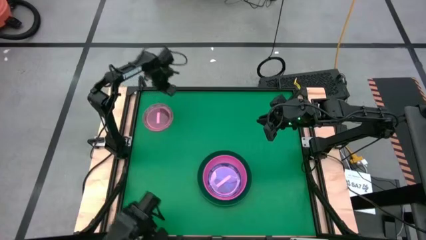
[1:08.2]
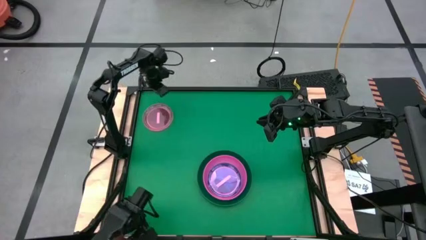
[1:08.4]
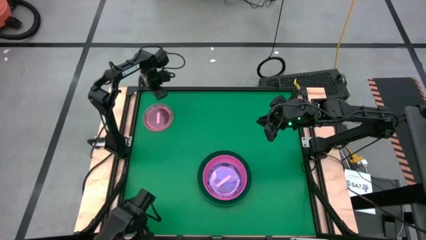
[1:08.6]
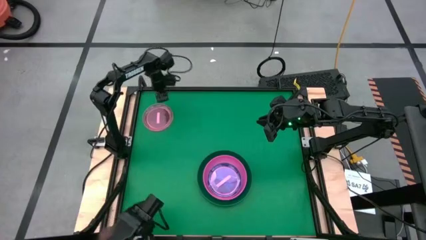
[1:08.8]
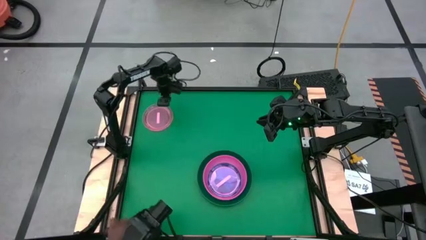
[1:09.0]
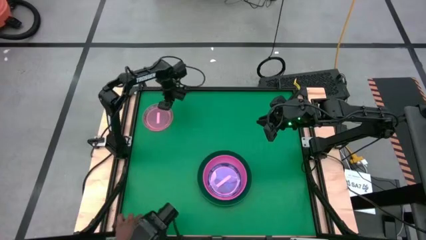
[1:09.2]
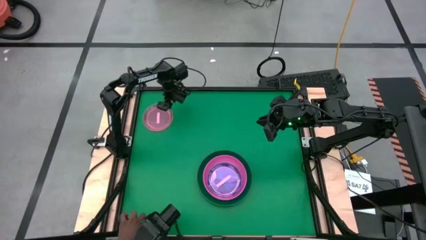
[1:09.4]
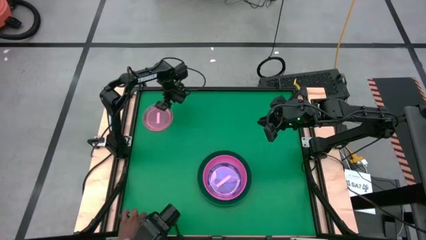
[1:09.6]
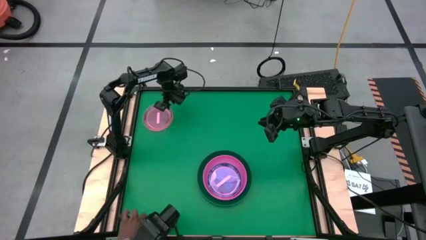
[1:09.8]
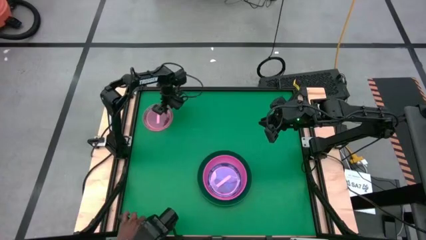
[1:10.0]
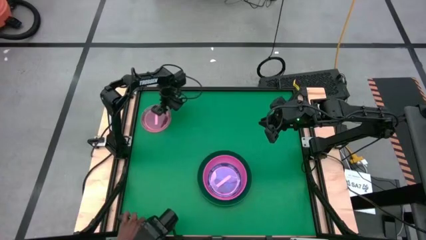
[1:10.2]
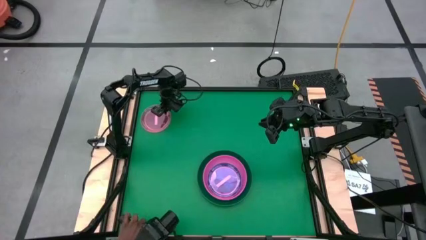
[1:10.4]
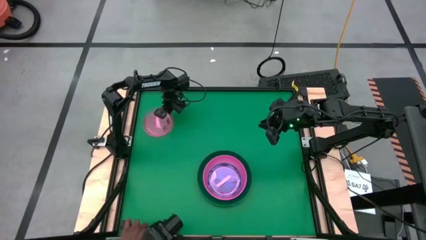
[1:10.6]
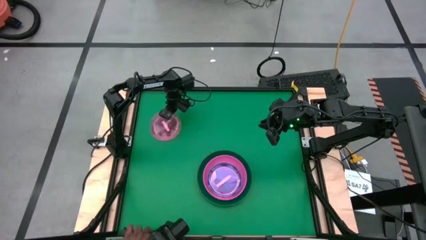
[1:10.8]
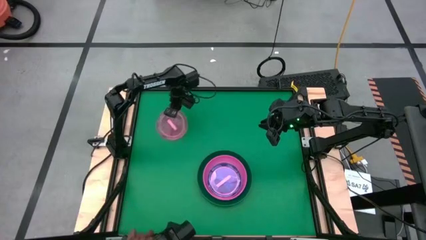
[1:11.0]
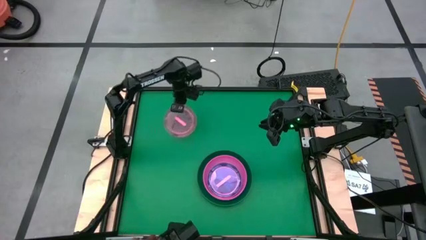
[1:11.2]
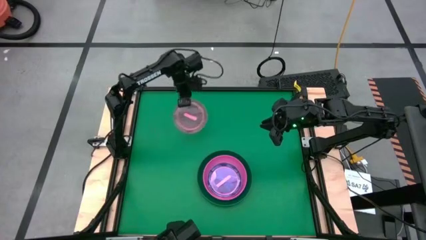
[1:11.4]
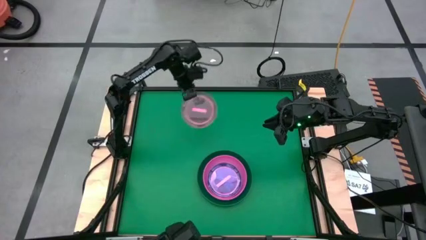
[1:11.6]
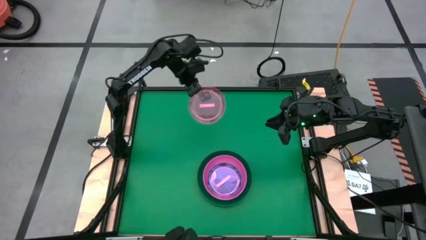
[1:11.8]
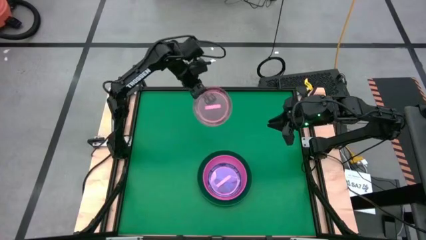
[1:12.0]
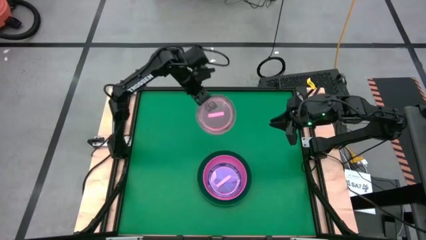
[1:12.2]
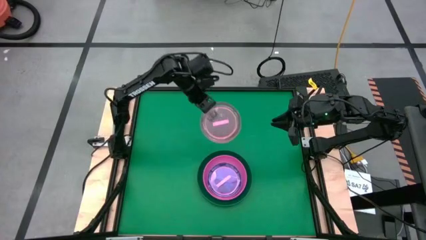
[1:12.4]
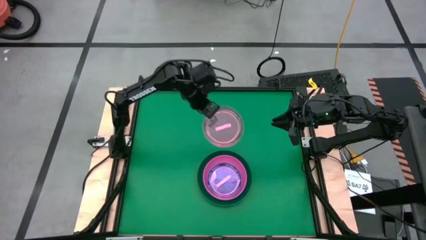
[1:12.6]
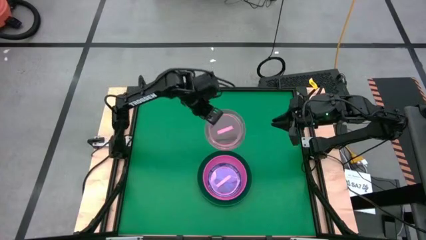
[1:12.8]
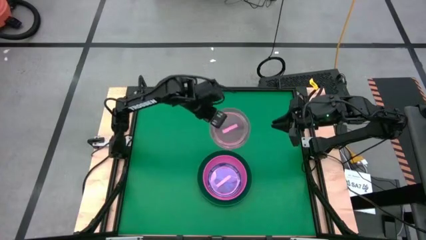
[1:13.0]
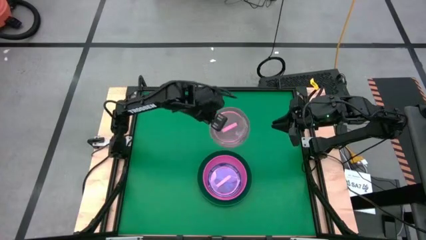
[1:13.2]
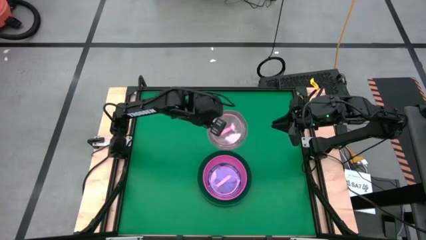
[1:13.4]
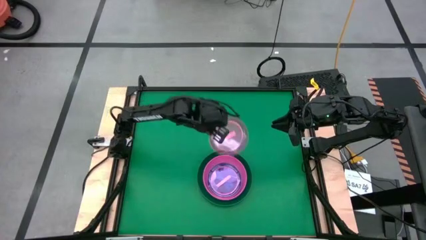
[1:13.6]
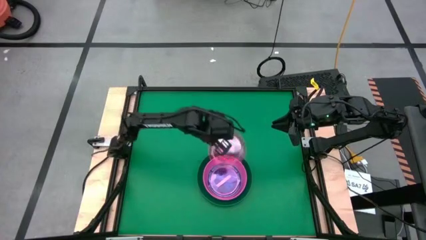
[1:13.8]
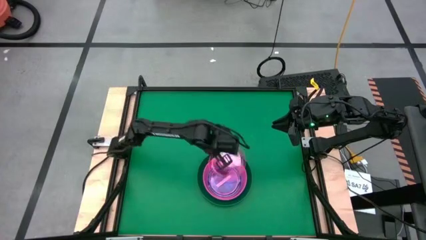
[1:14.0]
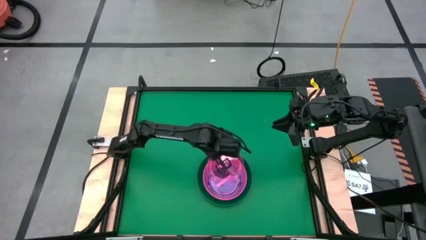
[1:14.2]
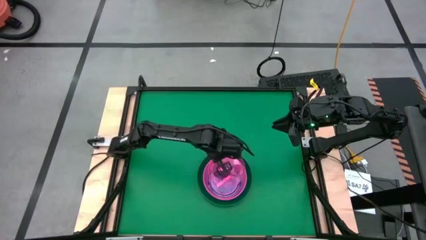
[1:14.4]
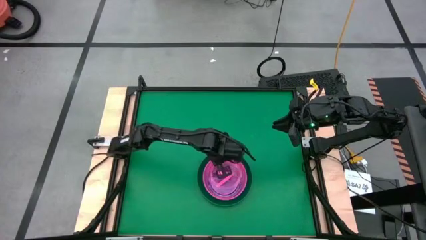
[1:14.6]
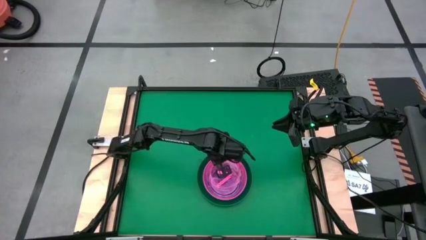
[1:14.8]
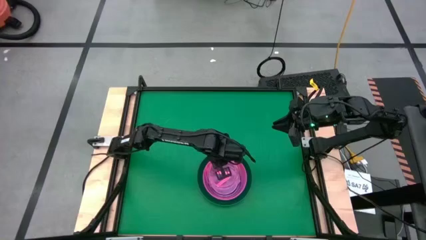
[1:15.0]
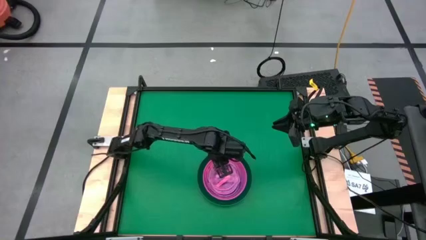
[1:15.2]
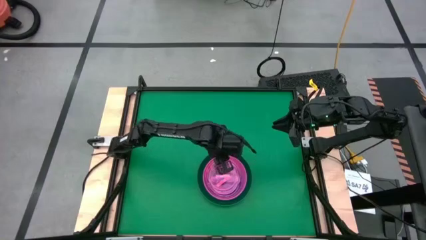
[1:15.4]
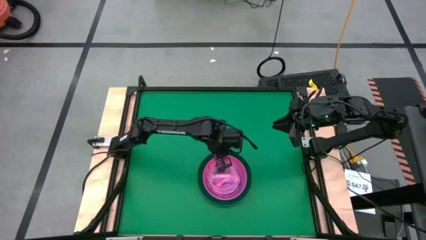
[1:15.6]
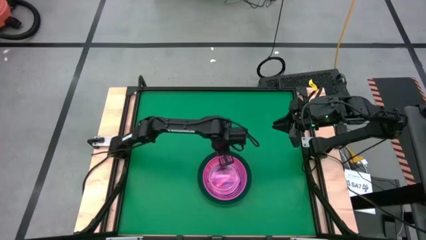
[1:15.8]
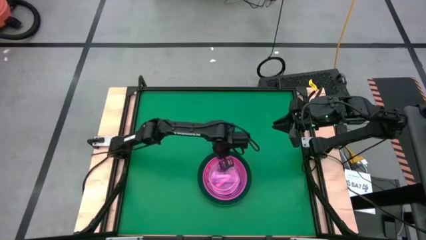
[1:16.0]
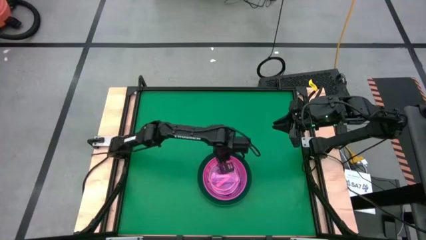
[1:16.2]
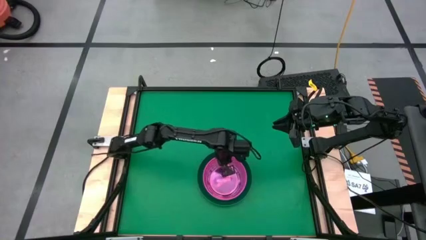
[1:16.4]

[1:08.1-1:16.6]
Task: Stack plastic plates
Stack the pink transparent plate on top of the other pink transparent plate

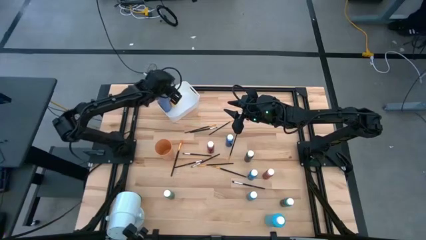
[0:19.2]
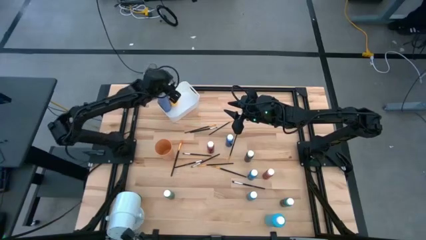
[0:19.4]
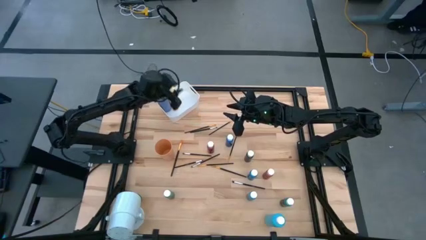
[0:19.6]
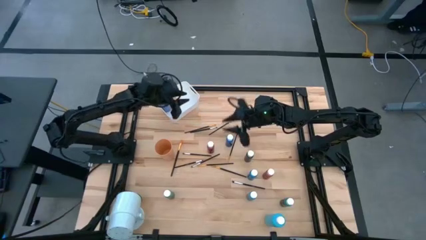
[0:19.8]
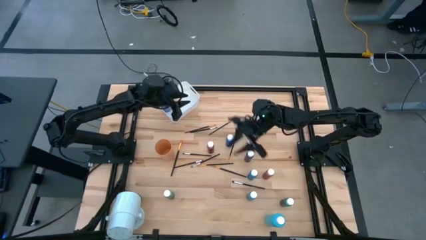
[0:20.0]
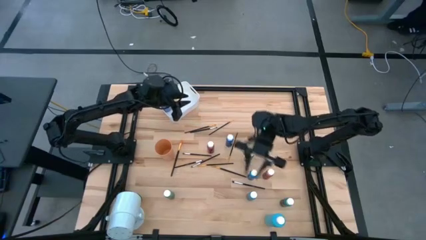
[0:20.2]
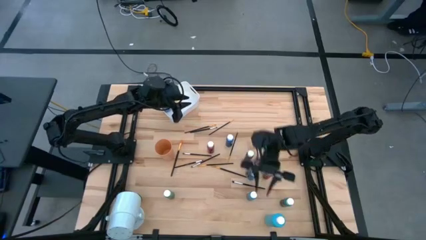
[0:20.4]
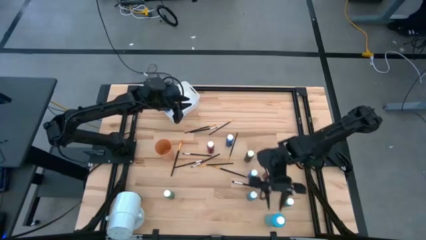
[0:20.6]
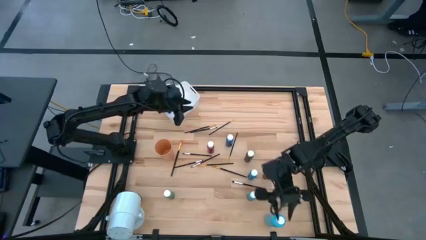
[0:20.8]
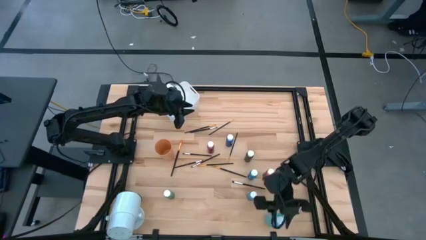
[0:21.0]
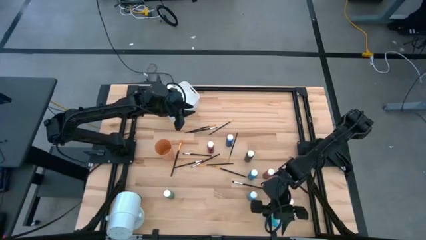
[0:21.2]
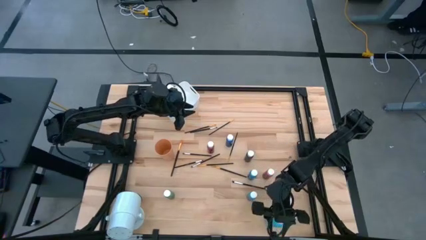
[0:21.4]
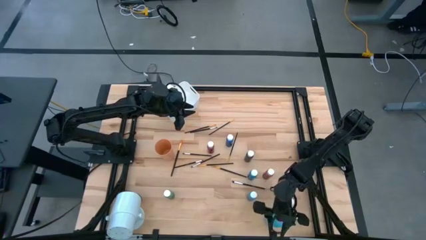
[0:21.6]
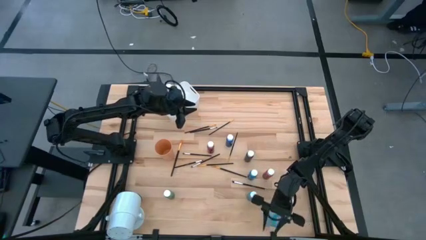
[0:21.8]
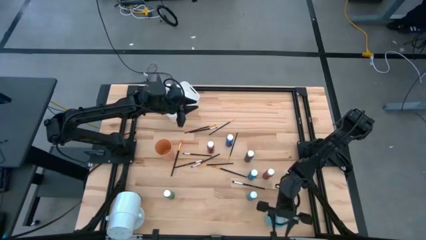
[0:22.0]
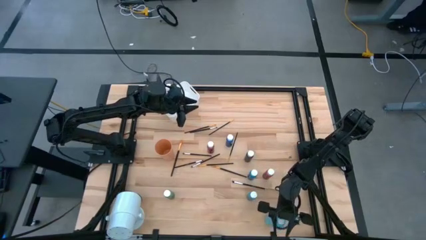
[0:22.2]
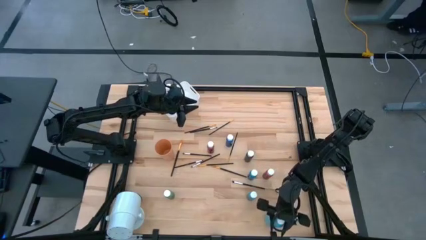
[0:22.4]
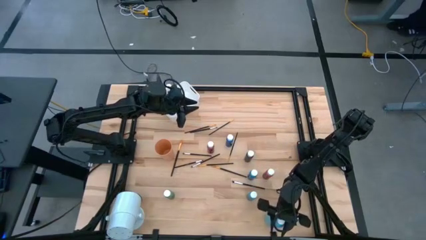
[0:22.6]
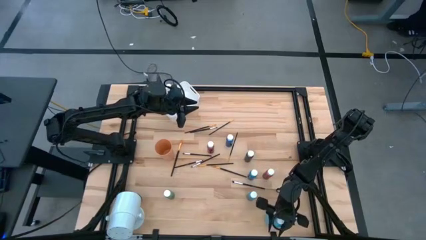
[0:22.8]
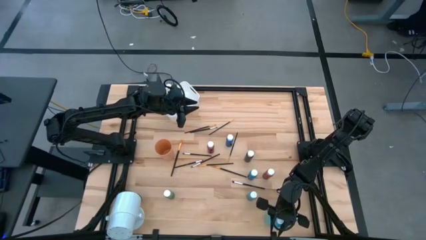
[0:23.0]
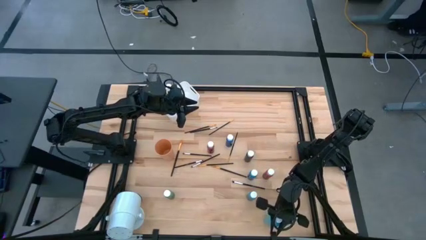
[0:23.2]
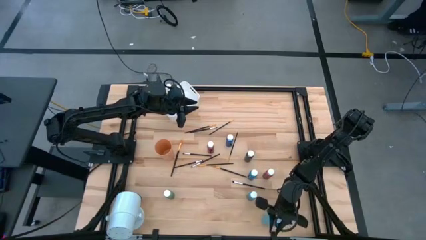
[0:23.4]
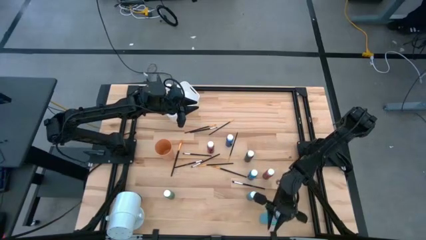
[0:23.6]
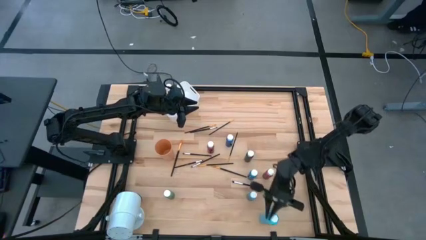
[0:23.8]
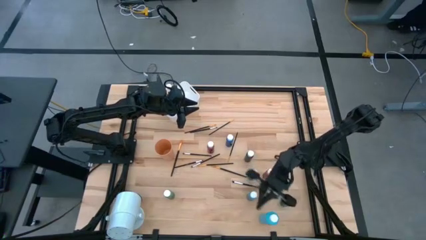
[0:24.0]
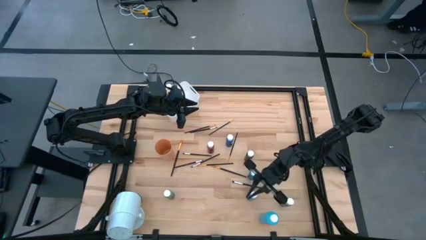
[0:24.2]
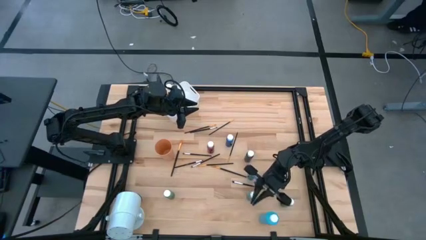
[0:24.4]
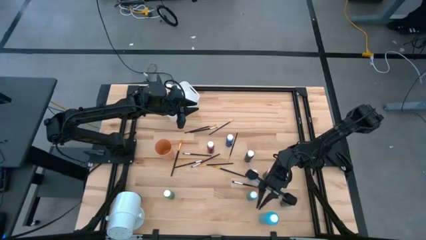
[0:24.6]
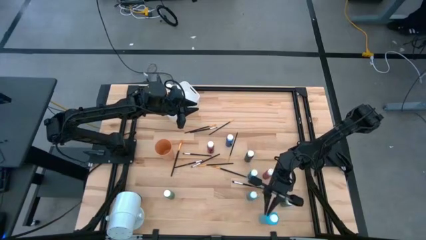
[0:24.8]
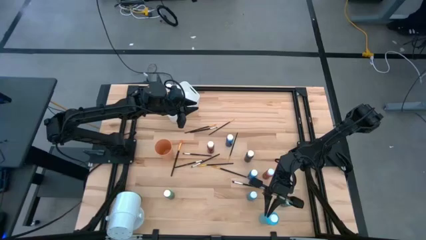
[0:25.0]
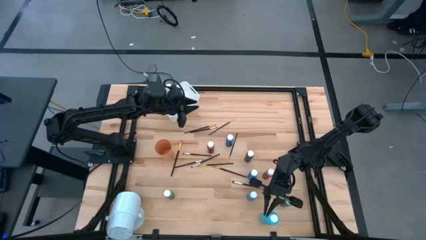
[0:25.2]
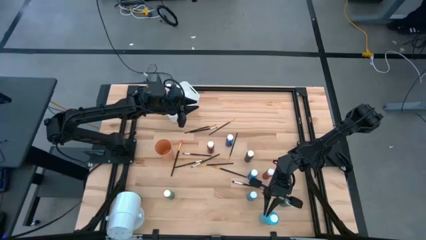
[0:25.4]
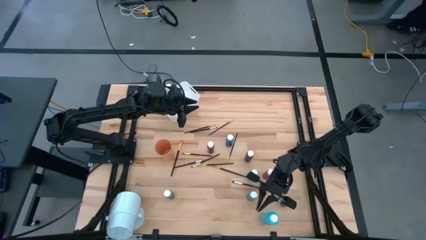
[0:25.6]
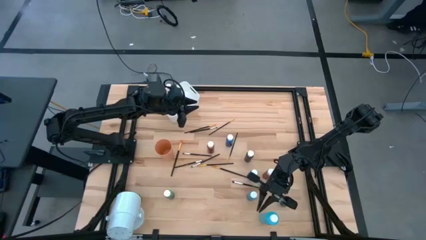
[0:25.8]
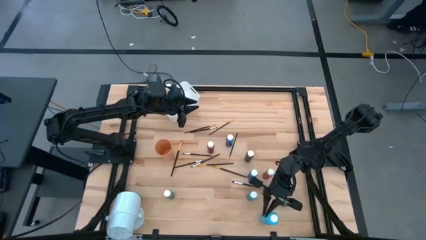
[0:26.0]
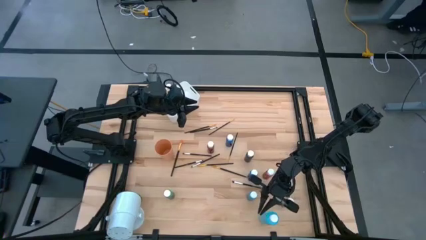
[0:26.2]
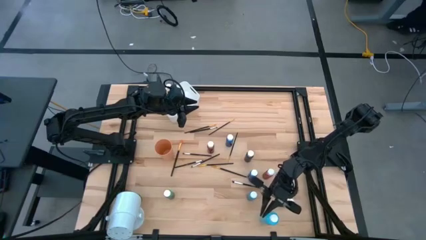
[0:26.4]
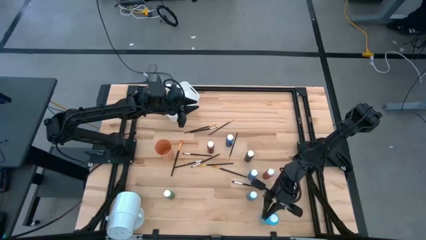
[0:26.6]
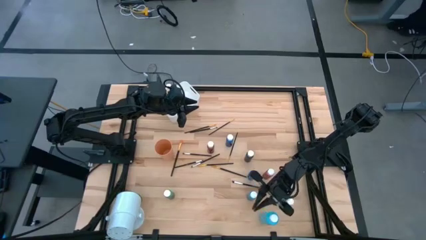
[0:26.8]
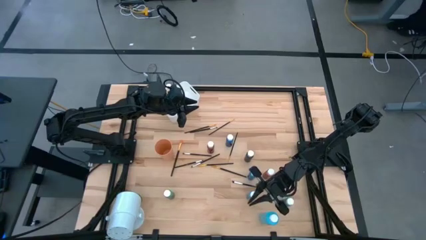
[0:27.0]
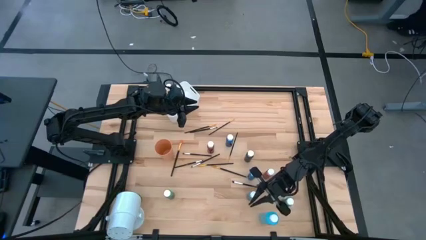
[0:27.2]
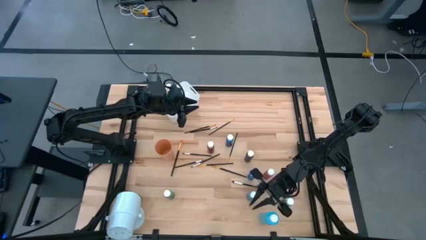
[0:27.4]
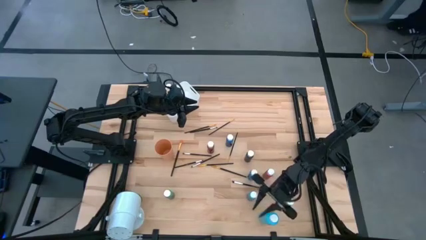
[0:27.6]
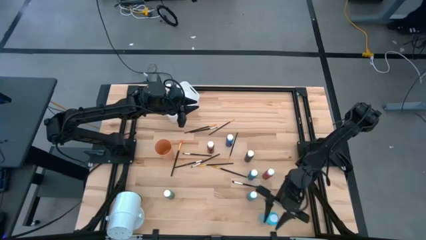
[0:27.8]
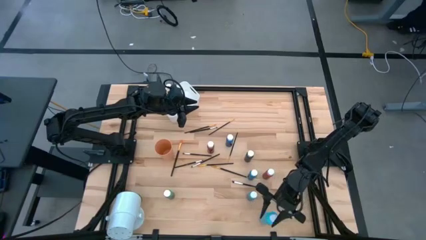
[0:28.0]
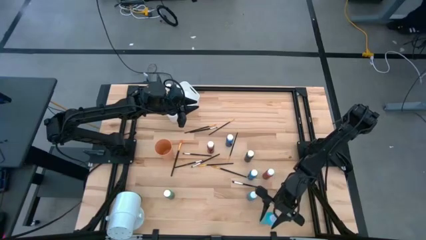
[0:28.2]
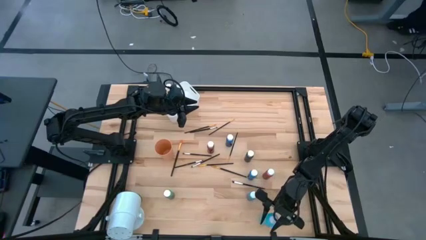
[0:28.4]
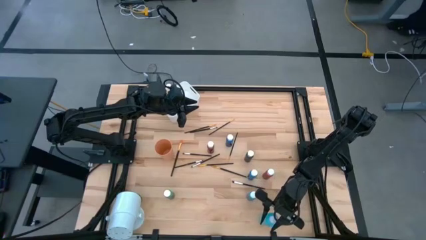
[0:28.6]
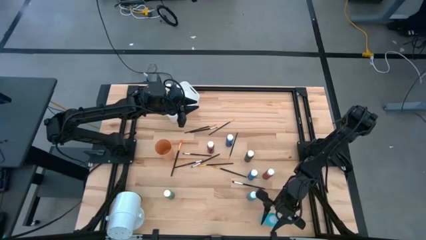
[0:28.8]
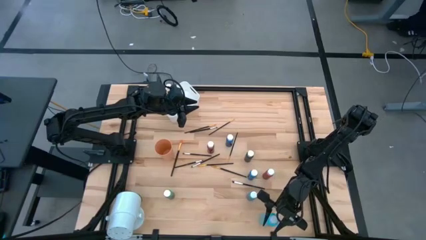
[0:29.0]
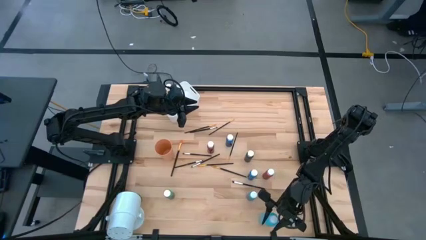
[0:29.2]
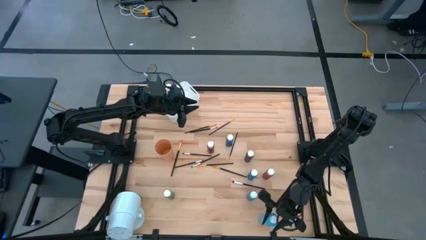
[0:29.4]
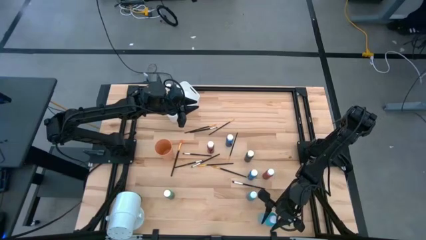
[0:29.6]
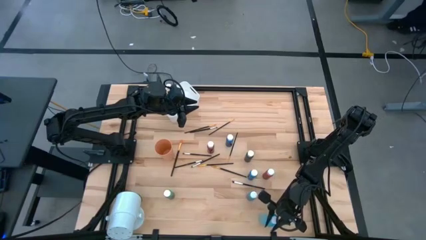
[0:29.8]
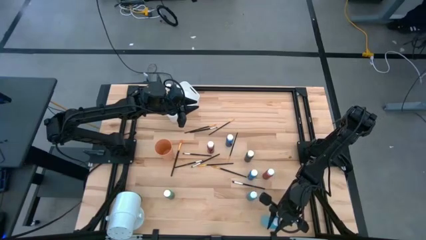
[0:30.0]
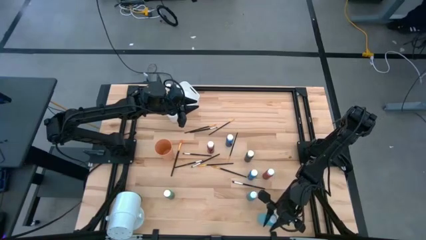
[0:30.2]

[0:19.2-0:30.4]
Task: Pick & Place Paint Supplies
Put the large light blue paint bottle into the white bin
